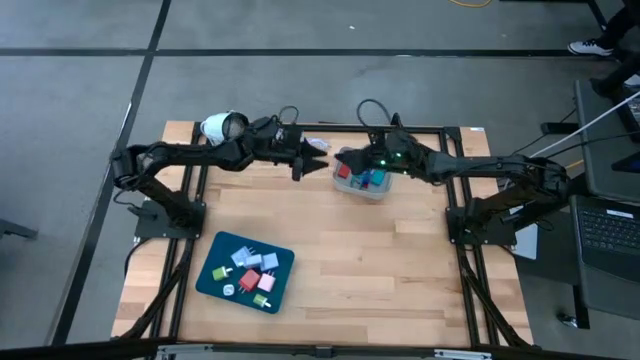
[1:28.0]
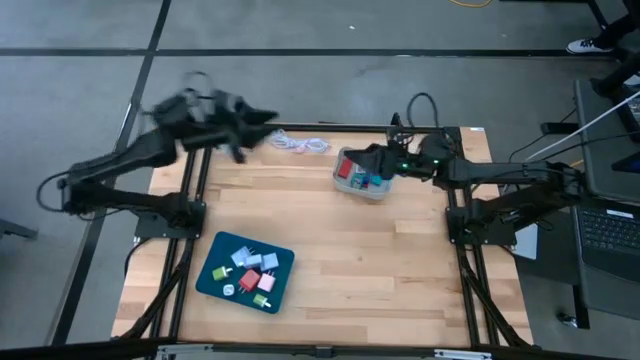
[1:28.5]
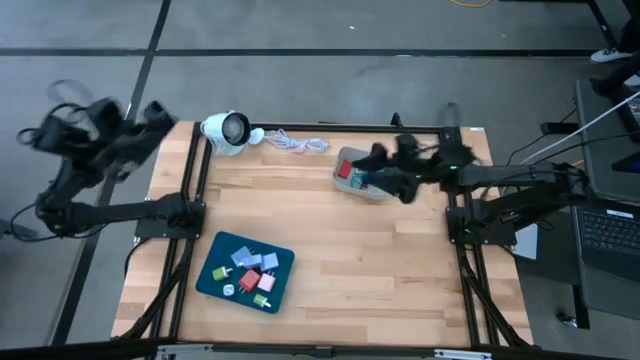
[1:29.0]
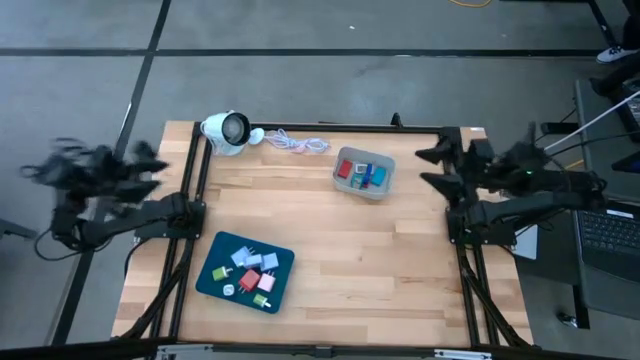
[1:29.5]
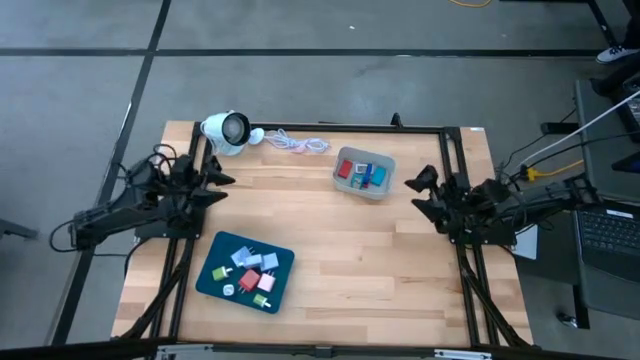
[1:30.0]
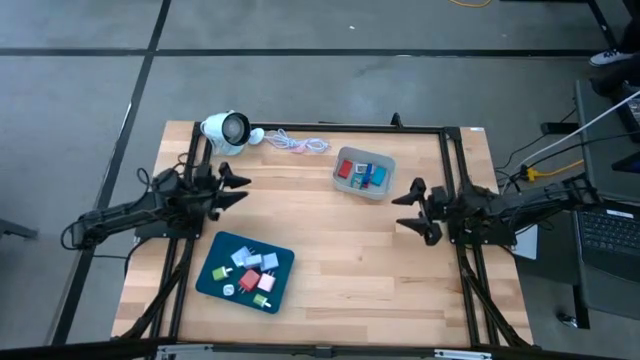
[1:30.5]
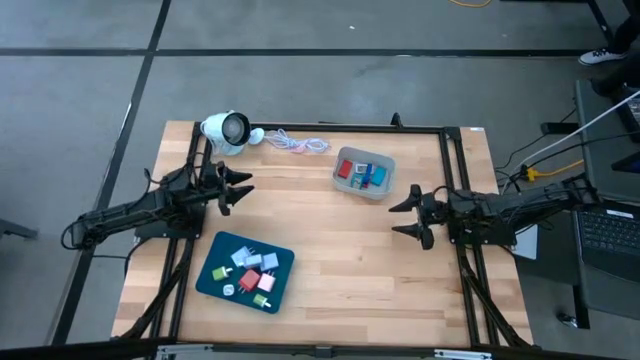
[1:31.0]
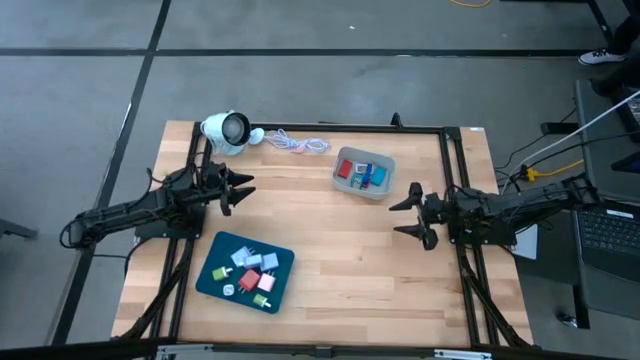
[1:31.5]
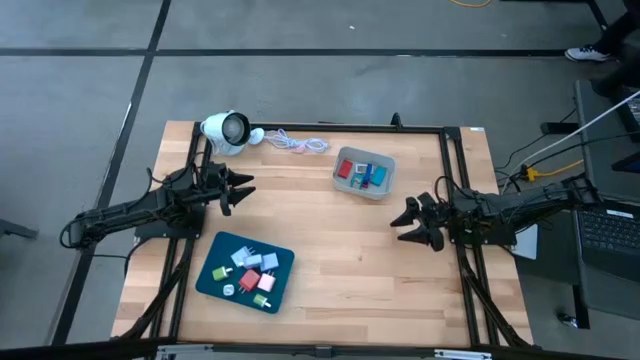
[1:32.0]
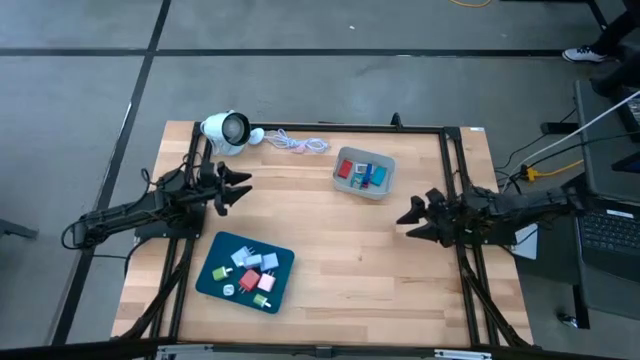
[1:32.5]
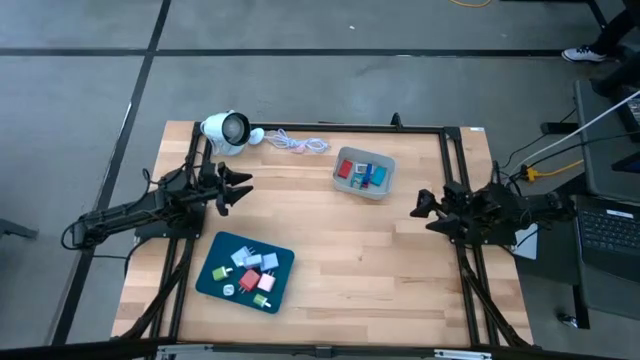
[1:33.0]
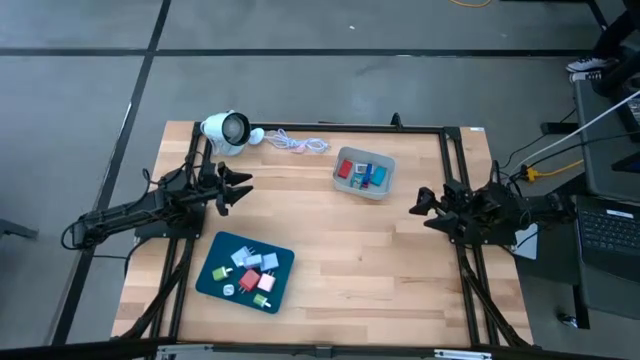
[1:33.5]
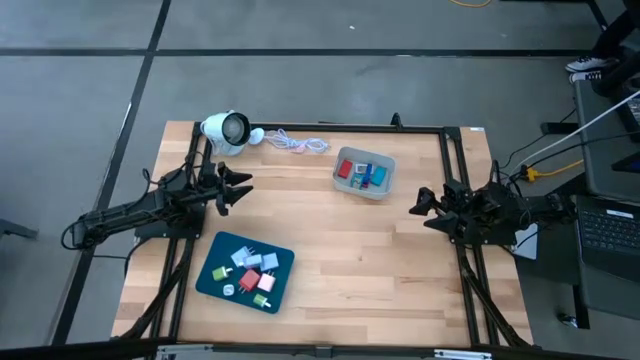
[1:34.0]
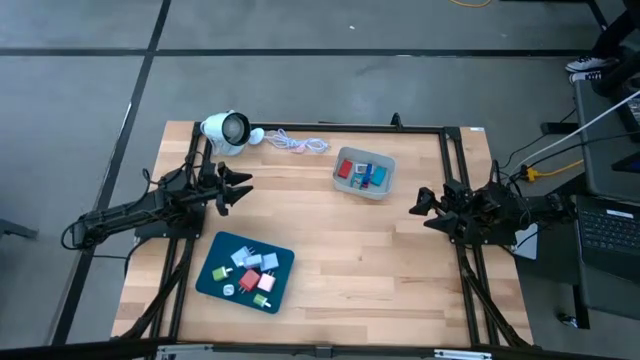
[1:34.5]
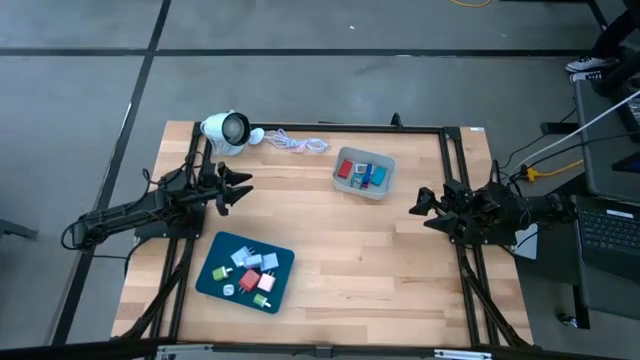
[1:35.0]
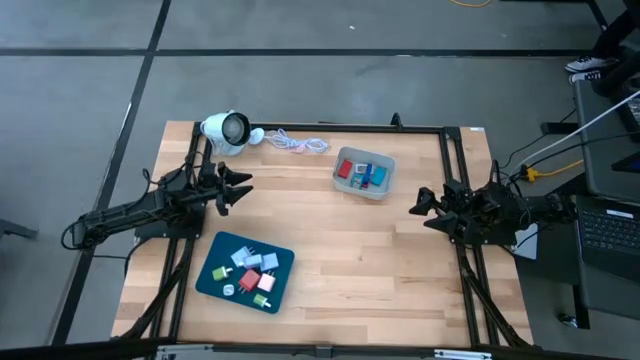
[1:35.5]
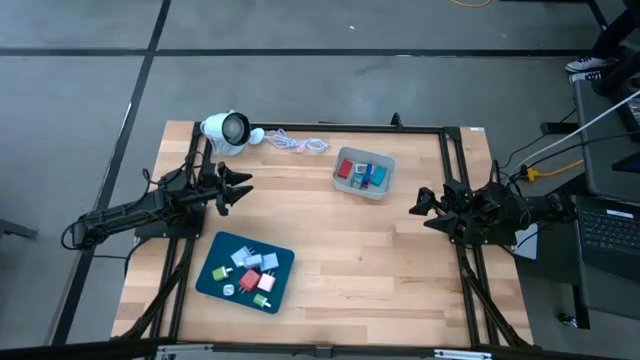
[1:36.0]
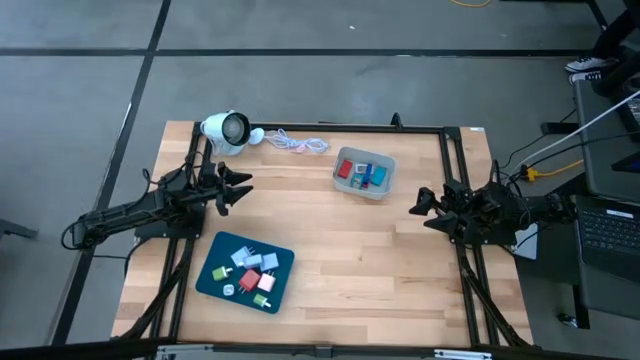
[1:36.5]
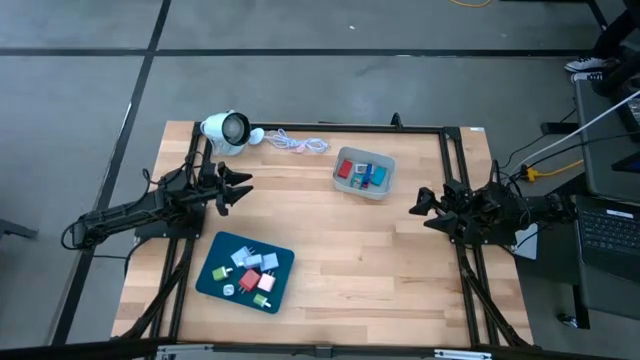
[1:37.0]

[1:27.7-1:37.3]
Task: Pick & Place Office items
Return to Home Position

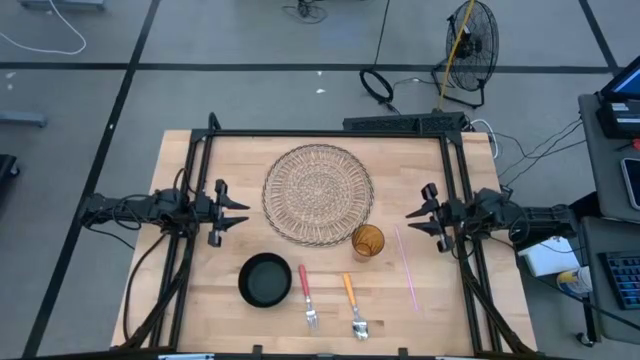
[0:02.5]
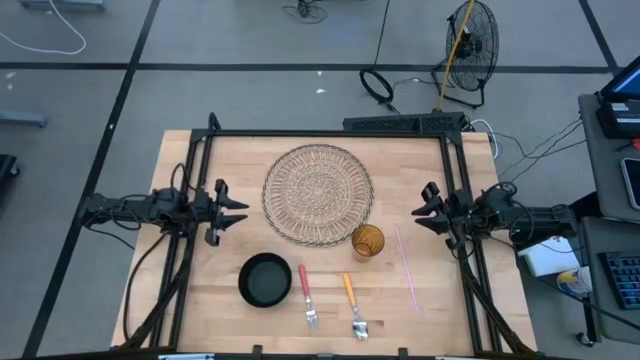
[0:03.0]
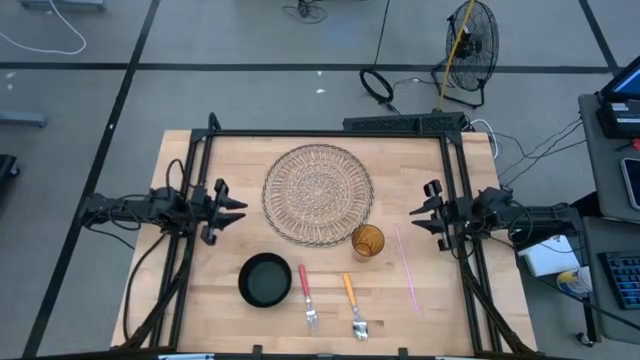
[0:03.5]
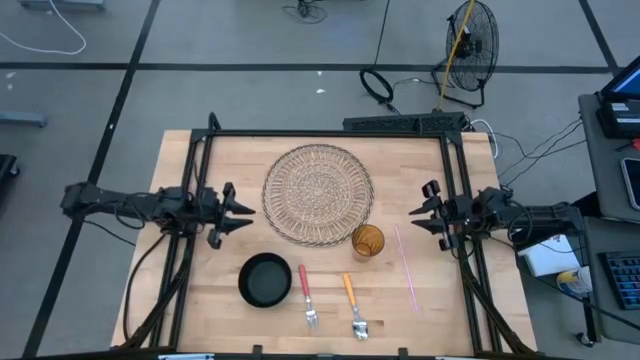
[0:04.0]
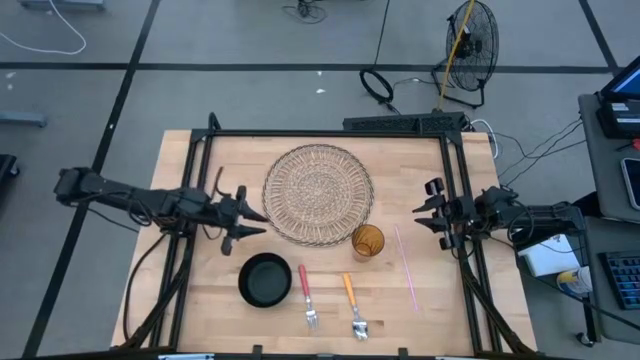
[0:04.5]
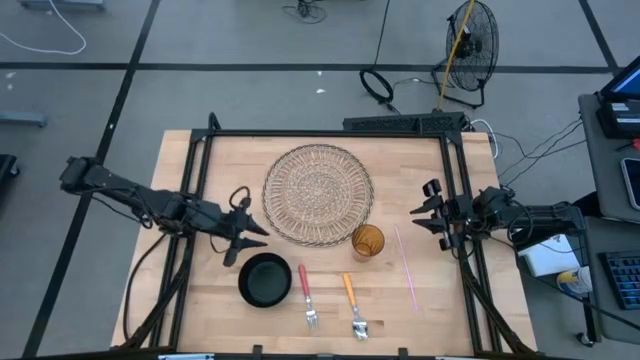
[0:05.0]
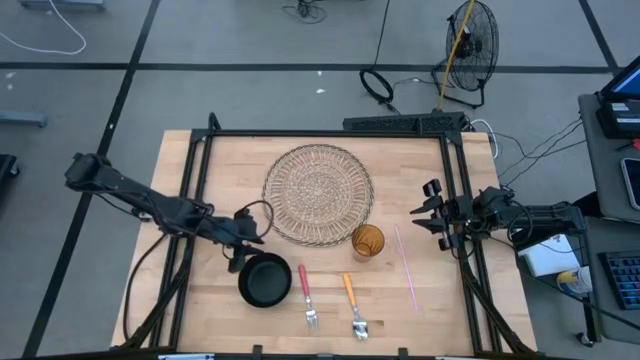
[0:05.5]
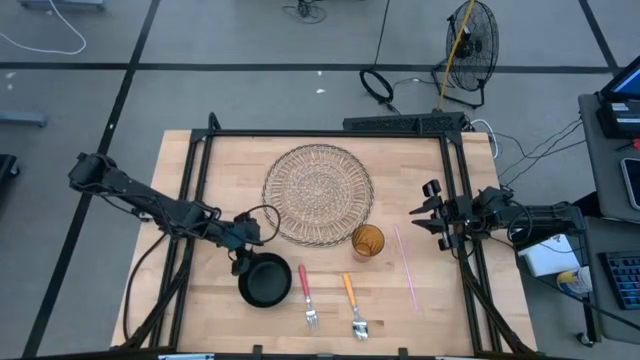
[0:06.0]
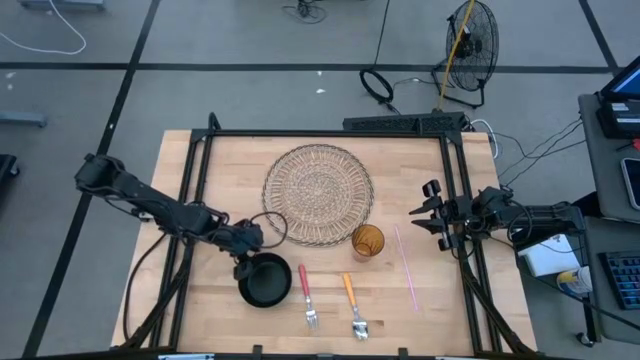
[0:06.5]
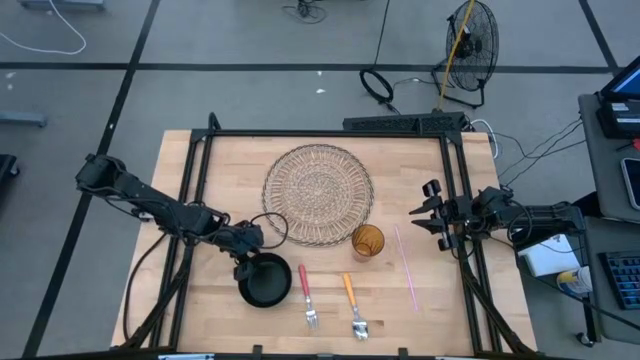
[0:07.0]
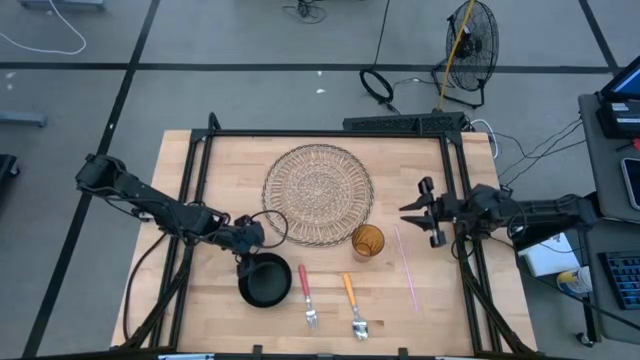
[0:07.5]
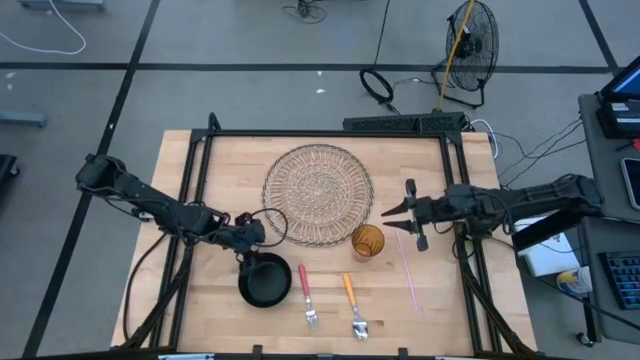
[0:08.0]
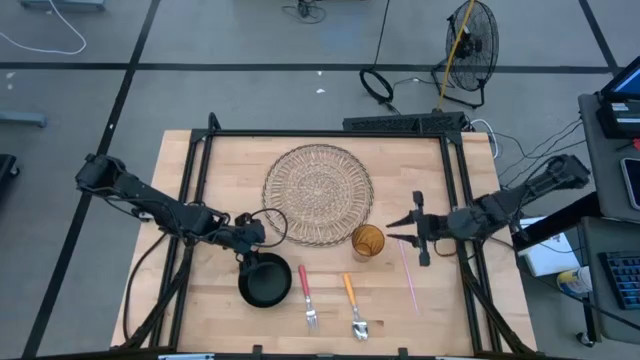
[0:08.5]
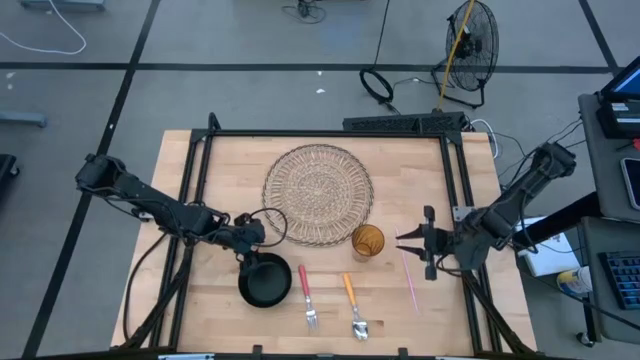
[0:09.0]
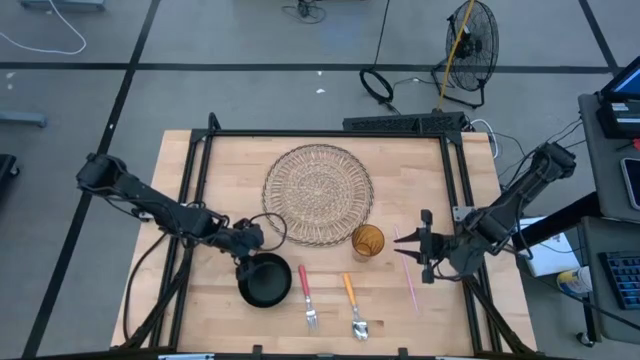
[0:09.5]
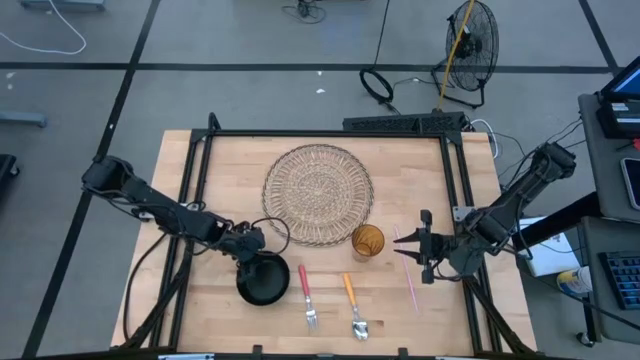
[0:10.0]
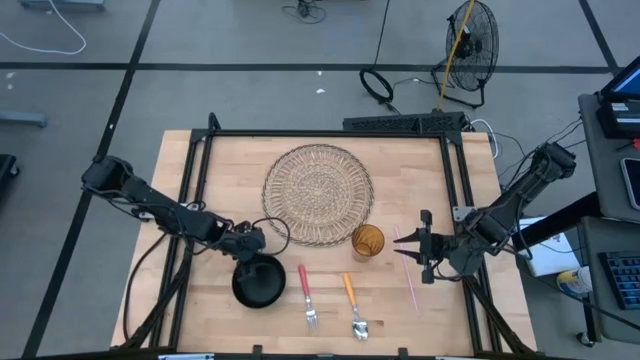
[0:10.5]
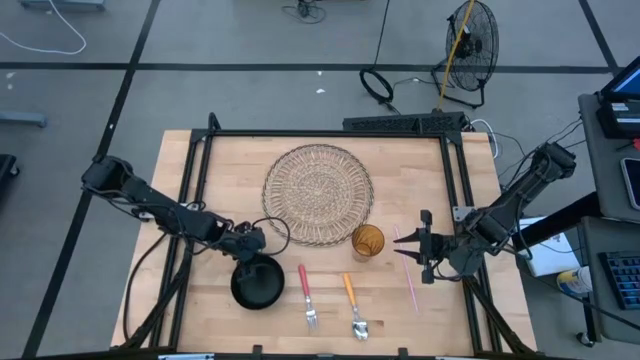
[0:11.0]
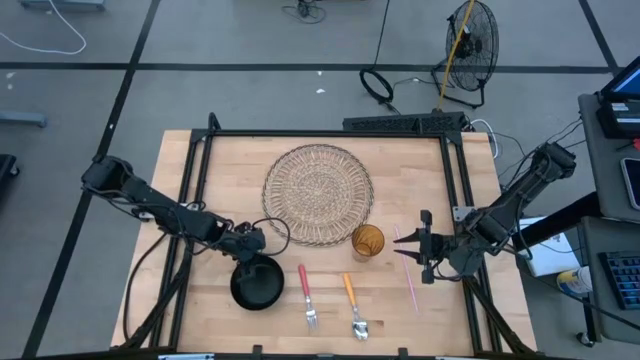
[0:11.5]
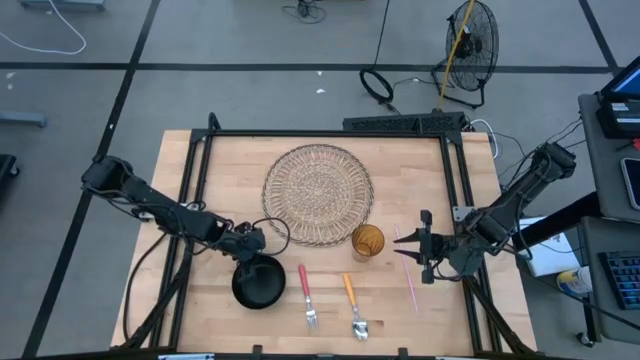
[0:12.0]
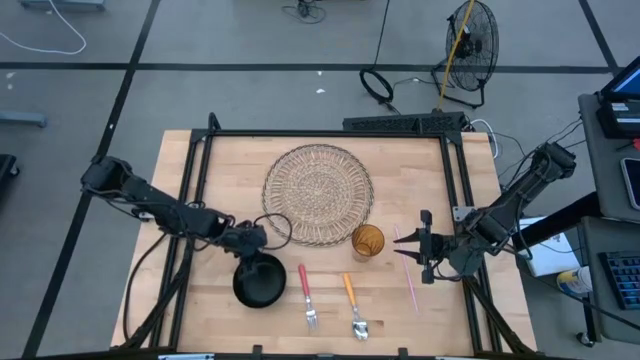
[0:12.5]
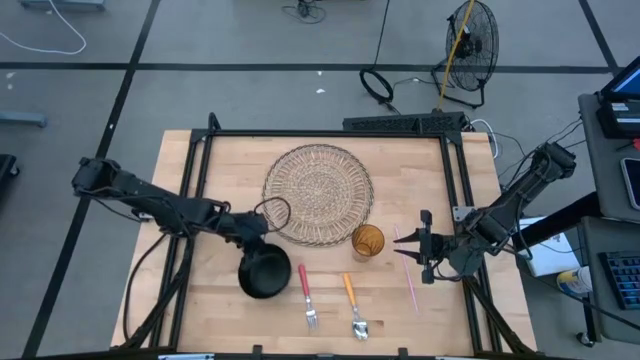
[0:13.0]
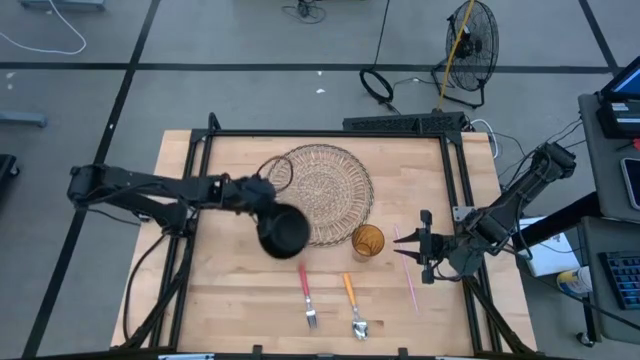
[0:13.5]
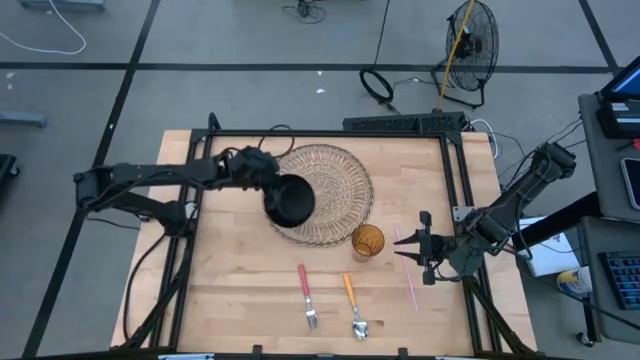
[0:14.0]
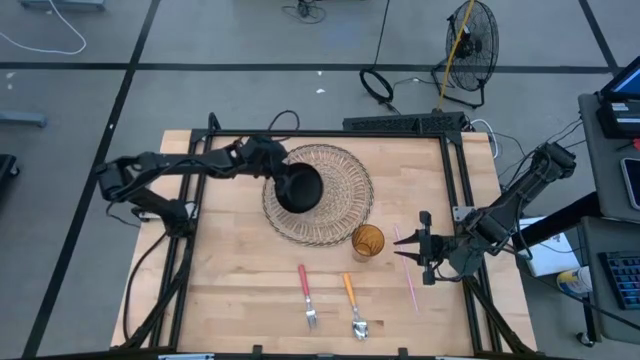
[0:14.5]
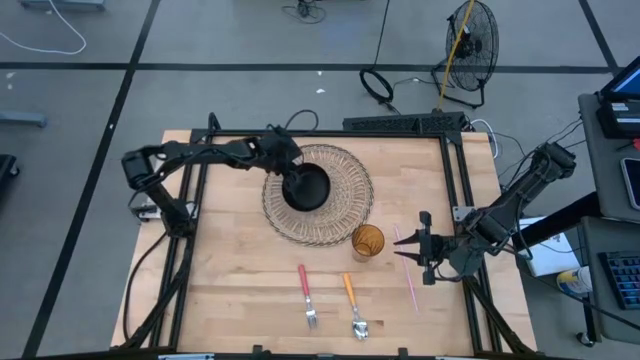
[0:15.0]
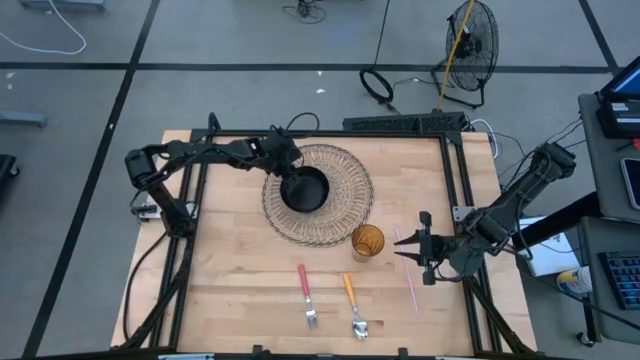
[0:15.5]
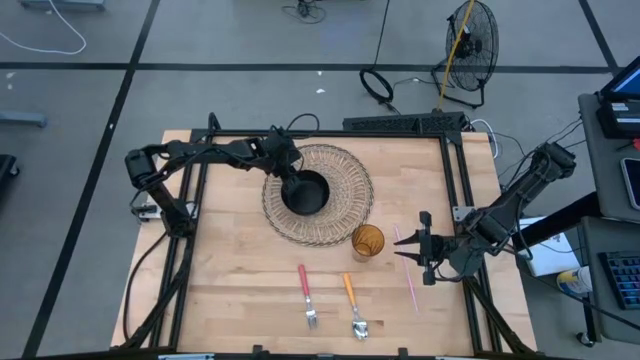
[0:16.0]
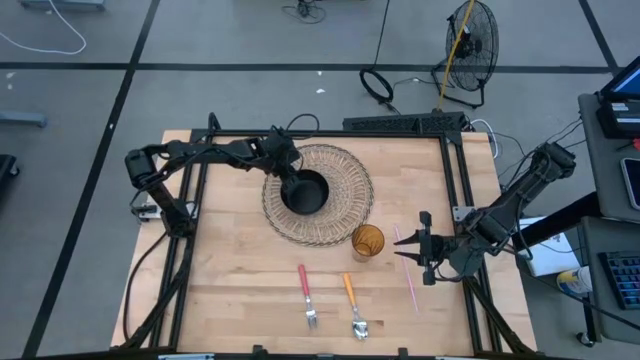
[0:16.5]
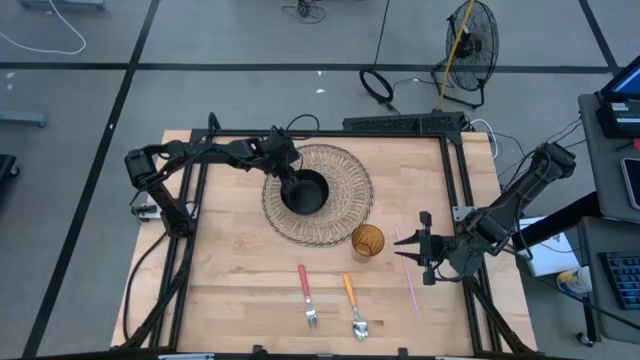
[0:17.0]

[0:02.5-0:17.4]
Task: Pick & Place Utensil
Put the black bowl on the woven mat
